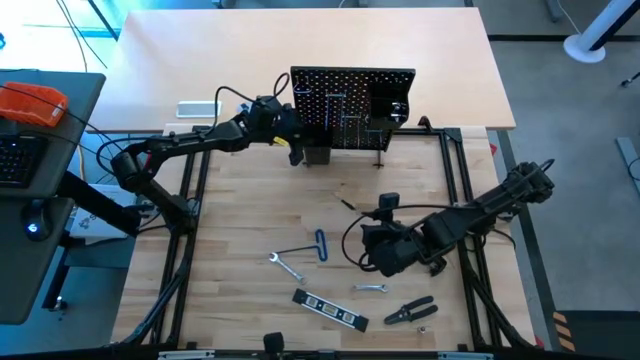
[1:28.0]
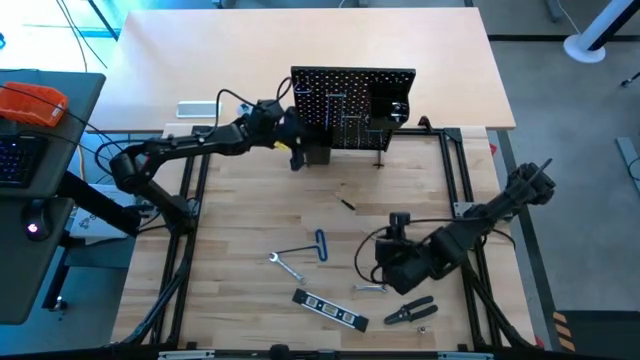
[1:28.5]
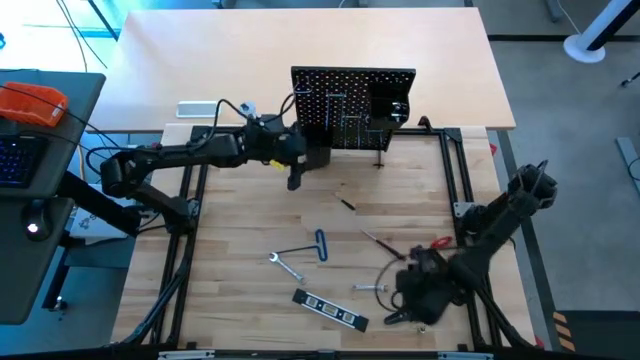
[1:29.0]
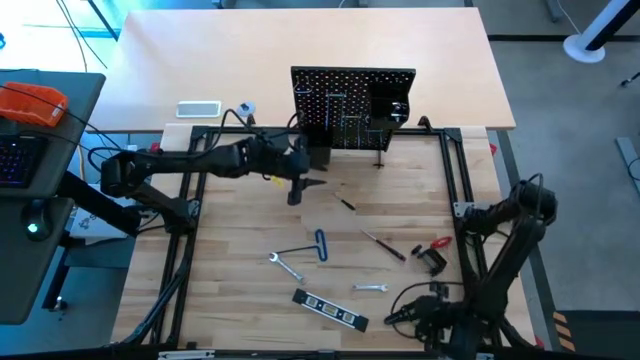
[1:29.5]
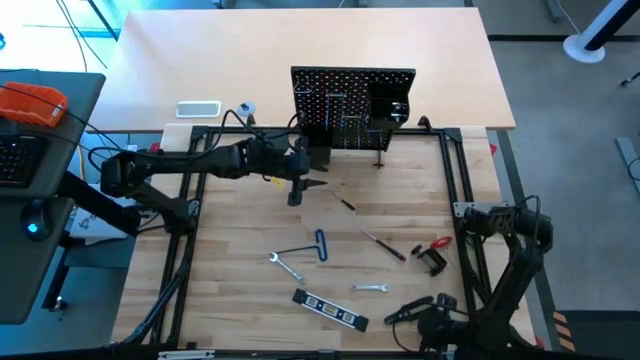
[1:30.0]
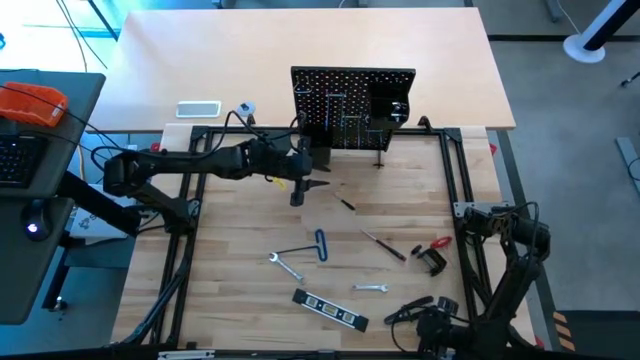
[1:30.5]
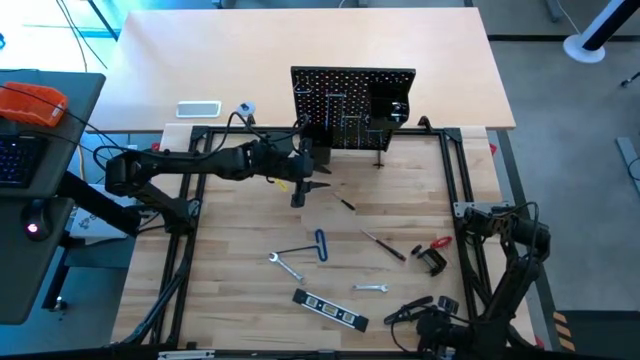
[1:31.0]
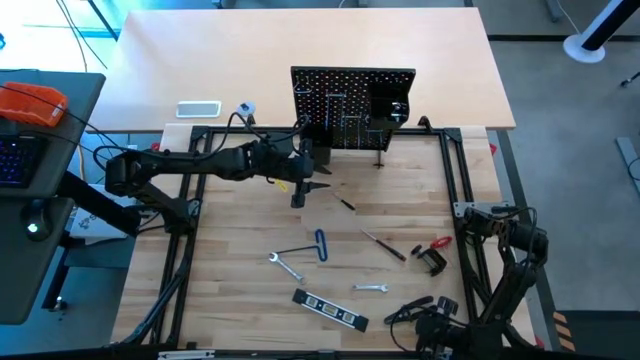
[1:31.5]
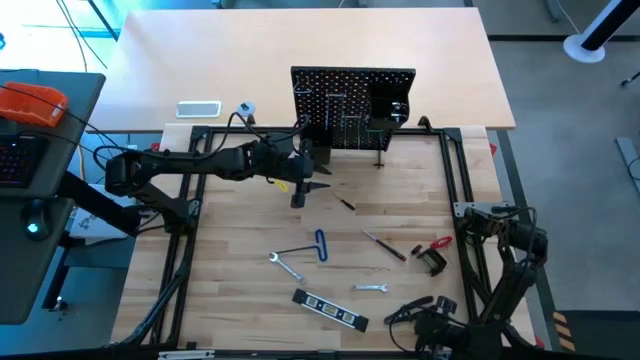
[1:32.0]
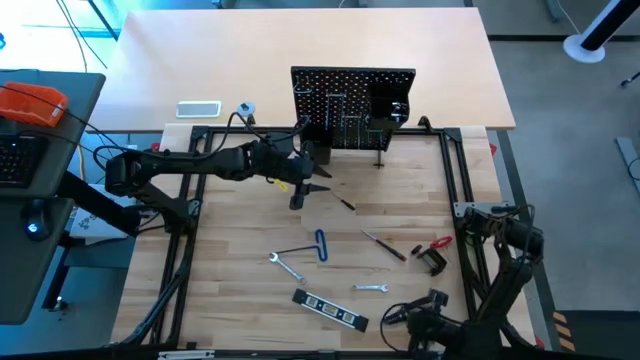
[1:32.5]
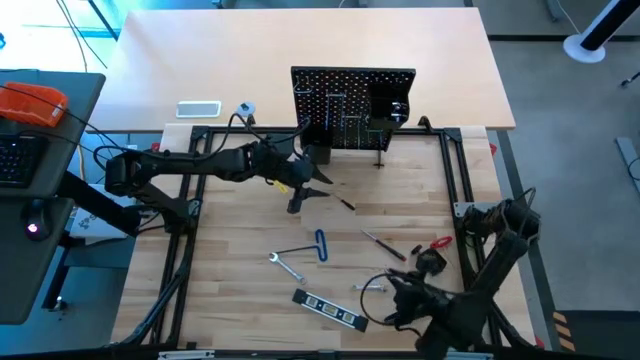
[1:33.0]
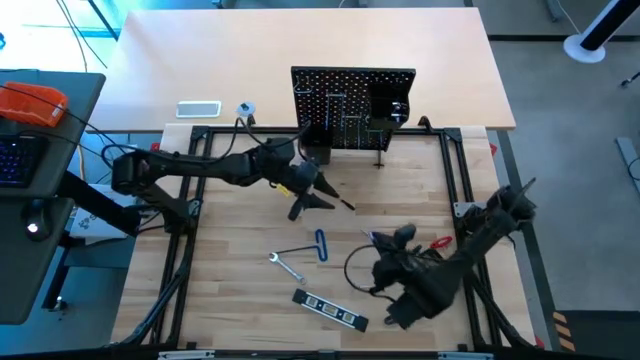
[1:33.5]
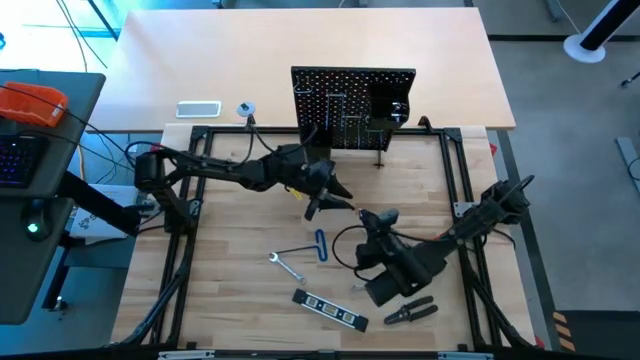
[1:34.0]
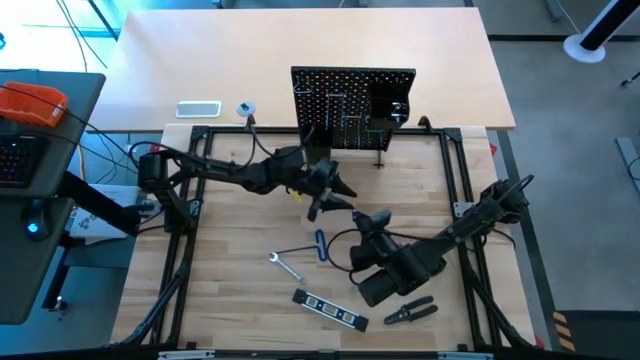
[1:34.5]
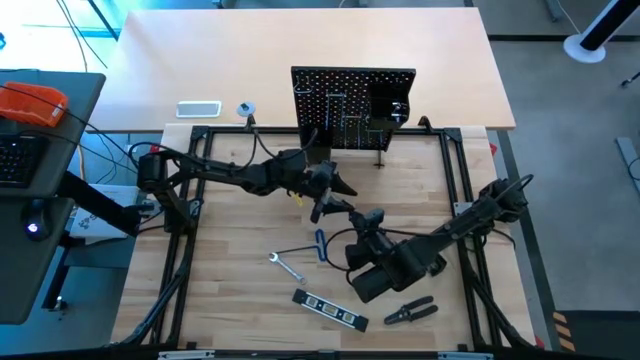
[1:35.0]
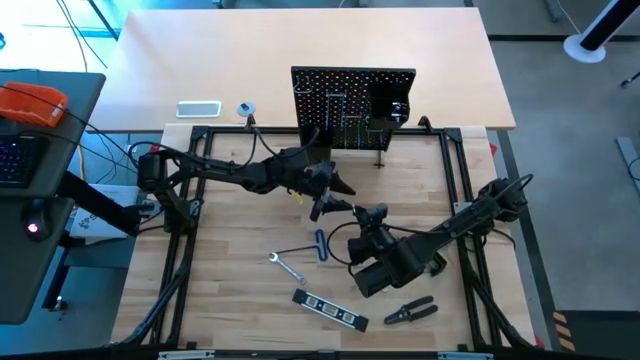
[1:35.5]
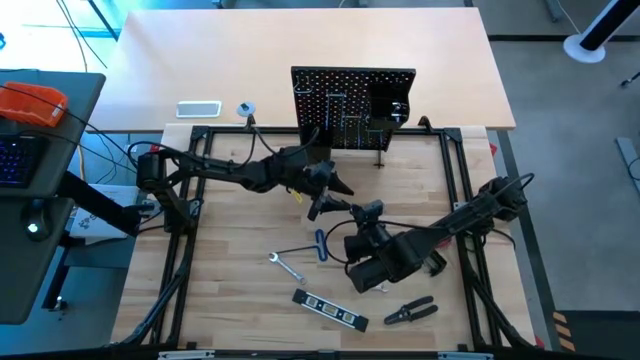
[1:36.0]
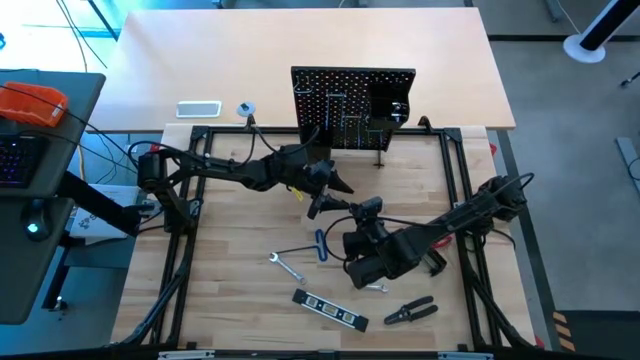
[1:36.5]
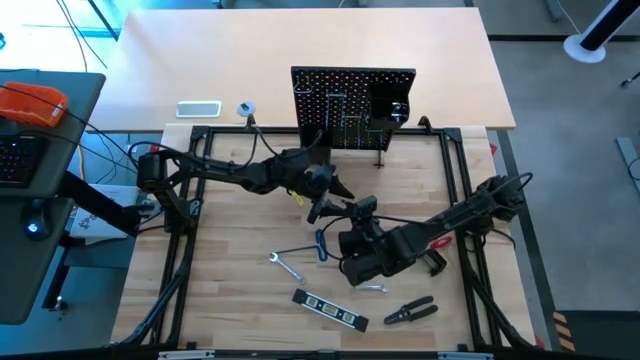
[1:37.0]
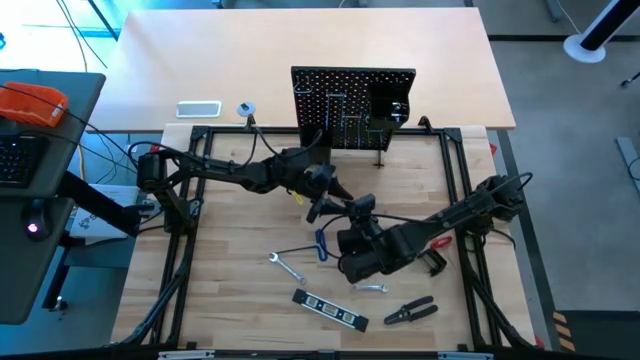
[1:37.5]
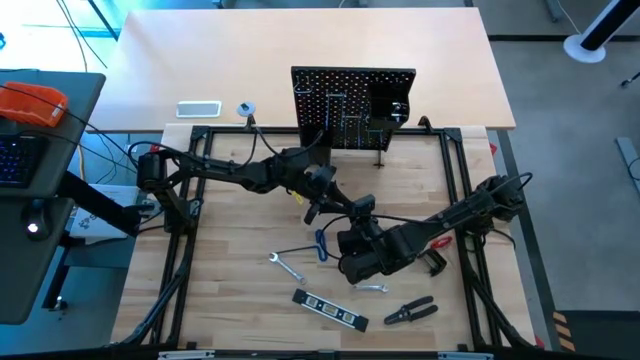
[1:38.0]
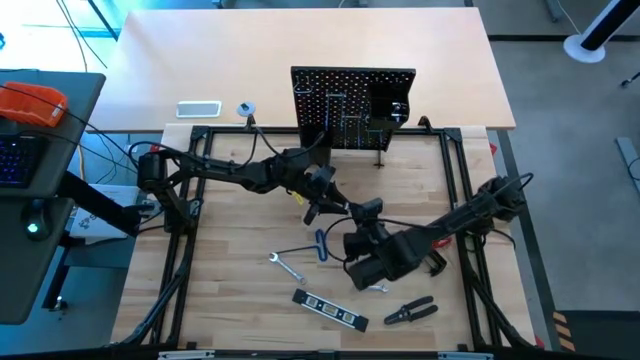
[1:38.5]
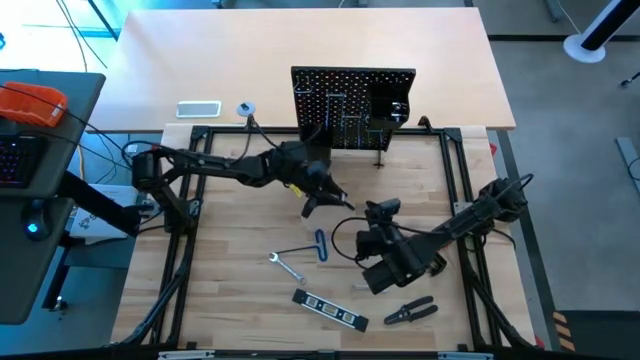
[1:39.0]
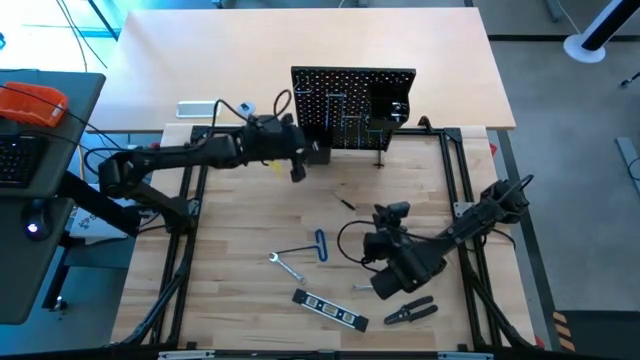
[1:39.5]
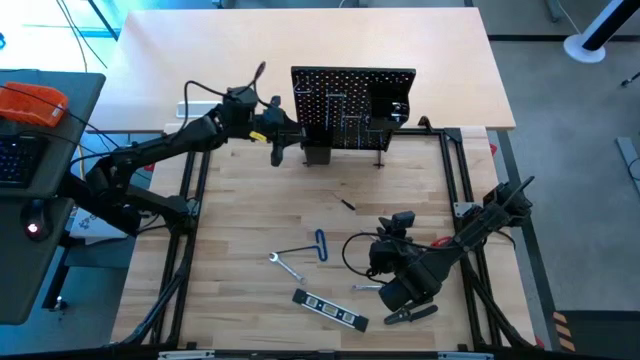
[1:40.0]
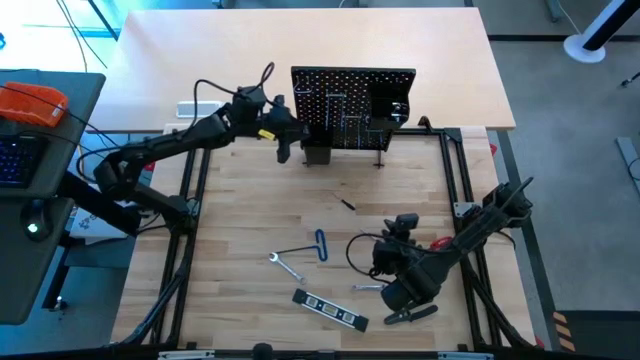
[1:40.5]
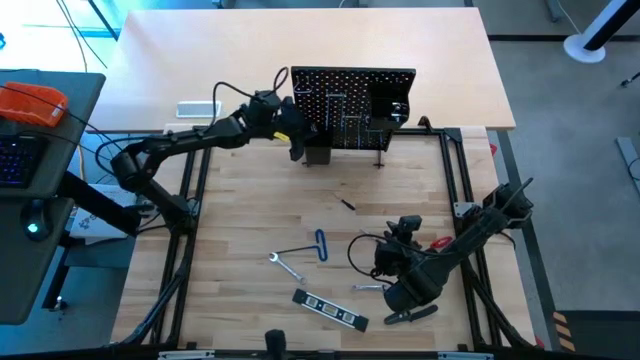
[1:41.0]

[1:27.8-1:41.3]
Task: Hang tools onto peg board
Put the bolts on the pegboard

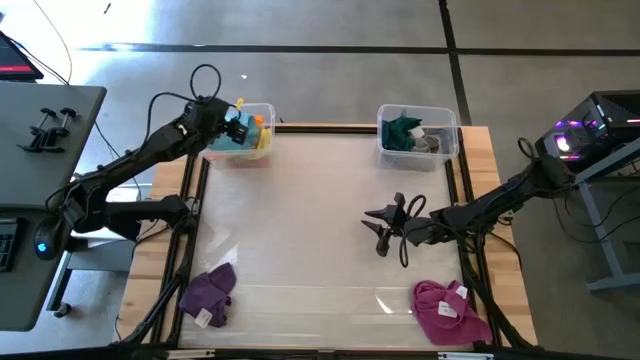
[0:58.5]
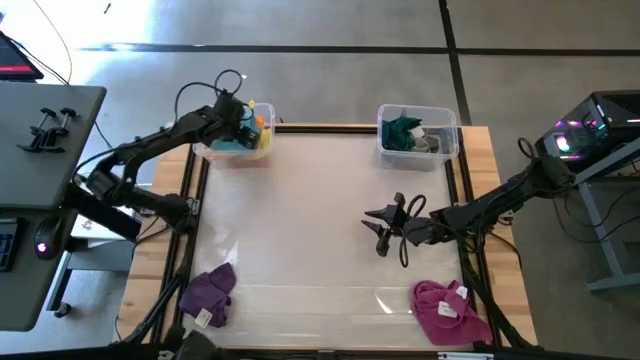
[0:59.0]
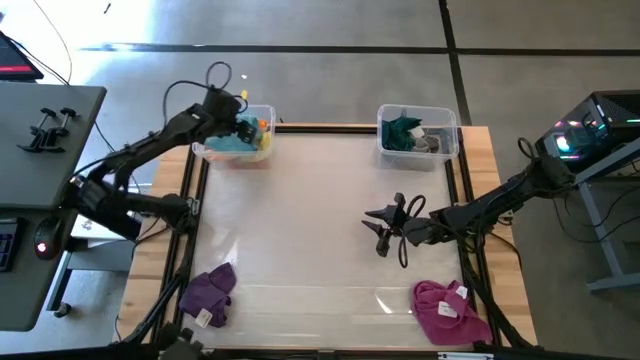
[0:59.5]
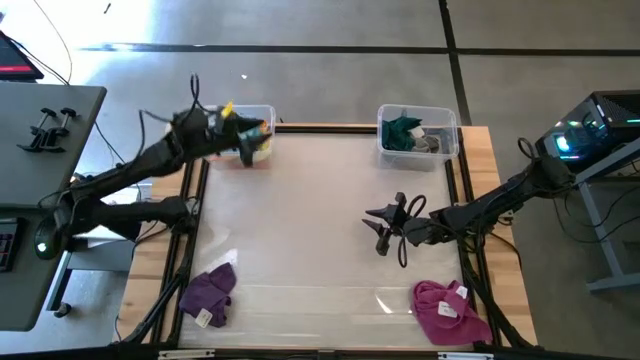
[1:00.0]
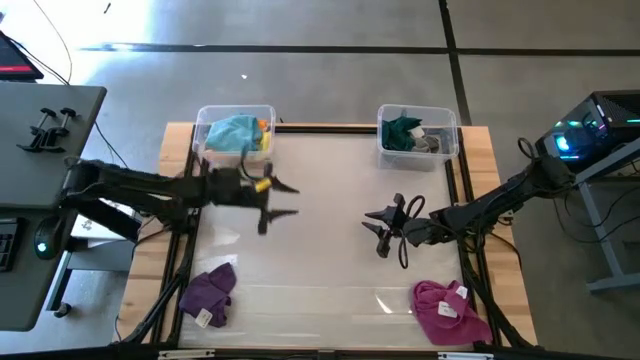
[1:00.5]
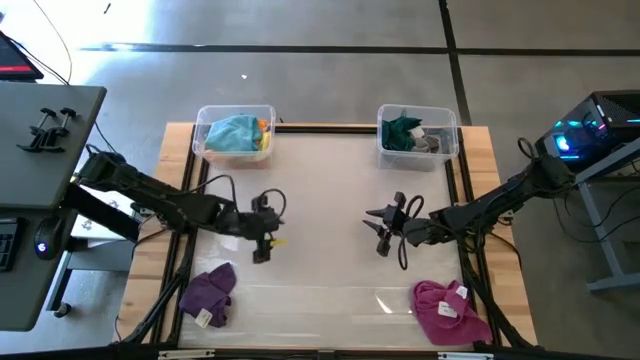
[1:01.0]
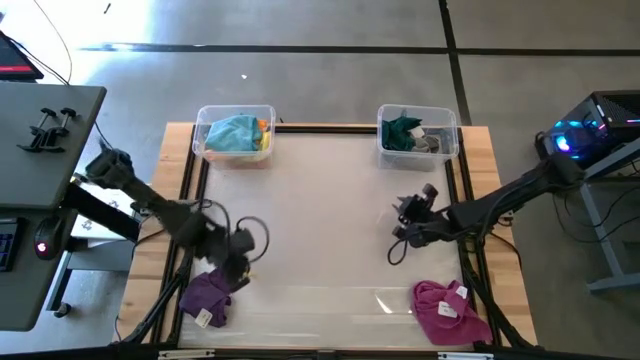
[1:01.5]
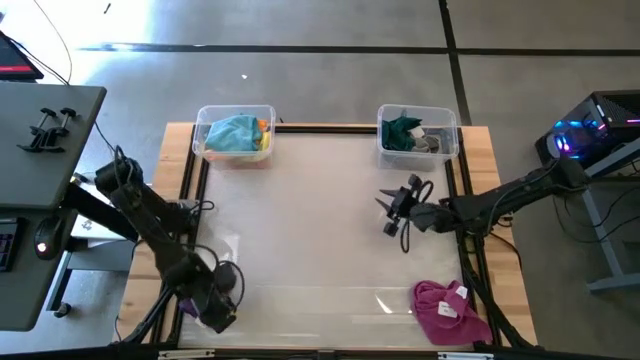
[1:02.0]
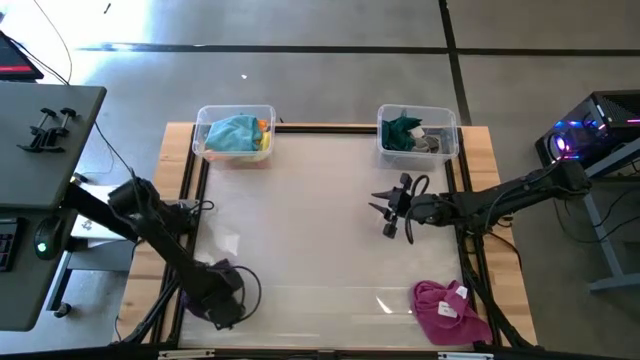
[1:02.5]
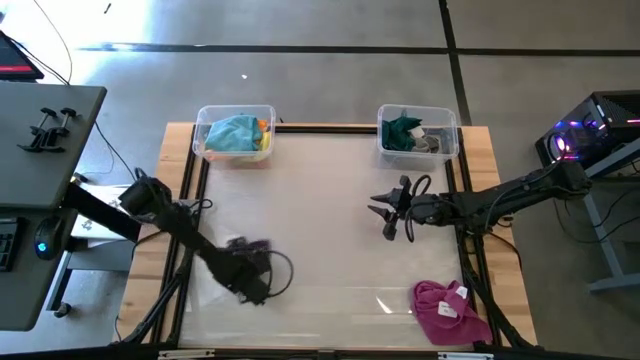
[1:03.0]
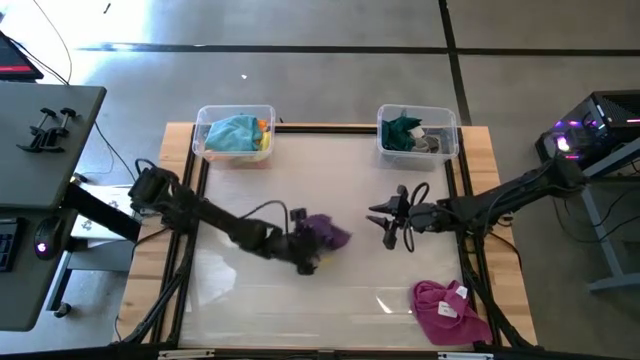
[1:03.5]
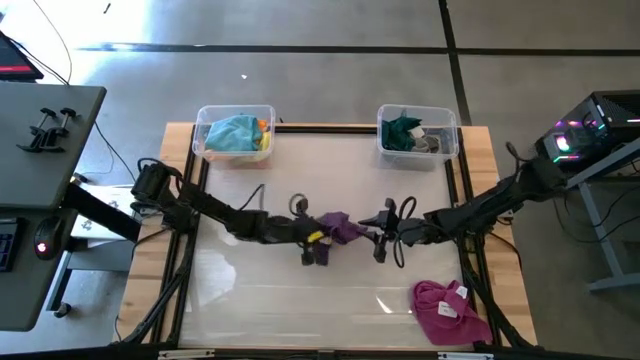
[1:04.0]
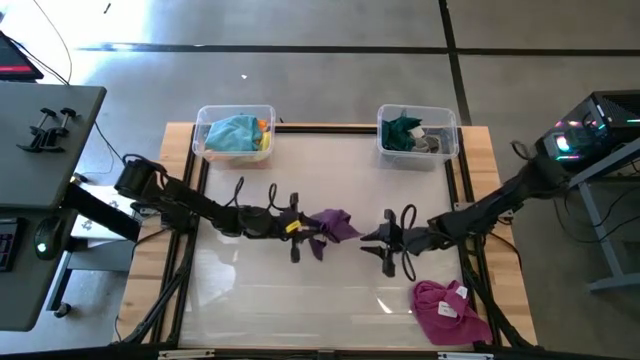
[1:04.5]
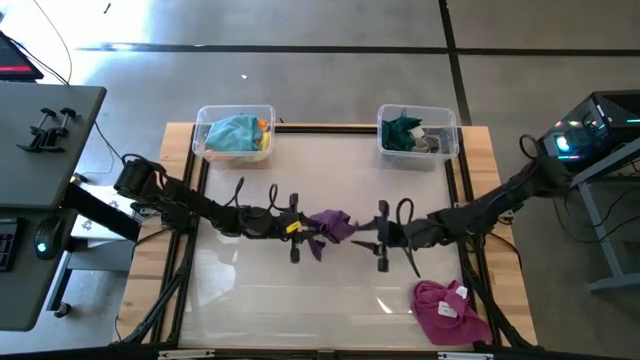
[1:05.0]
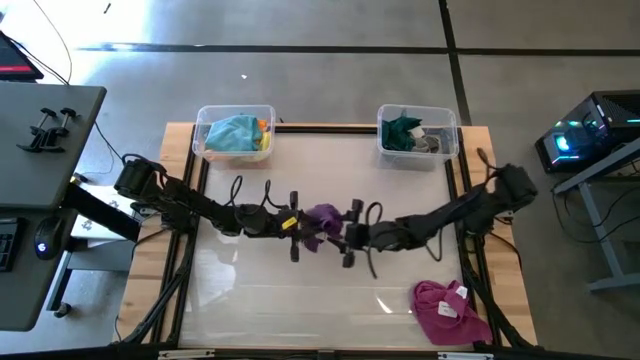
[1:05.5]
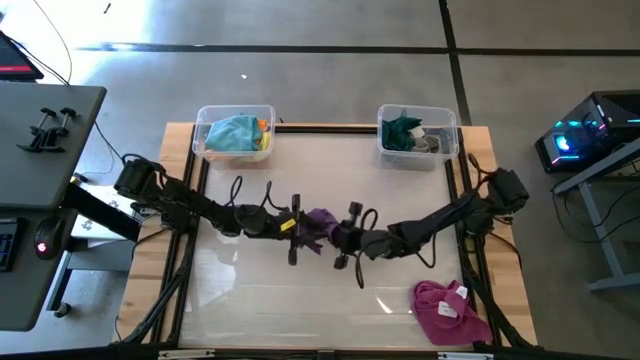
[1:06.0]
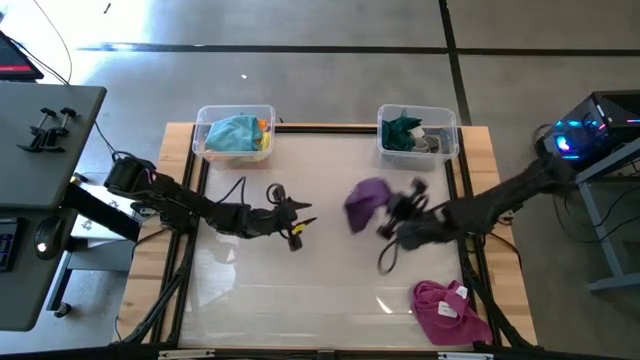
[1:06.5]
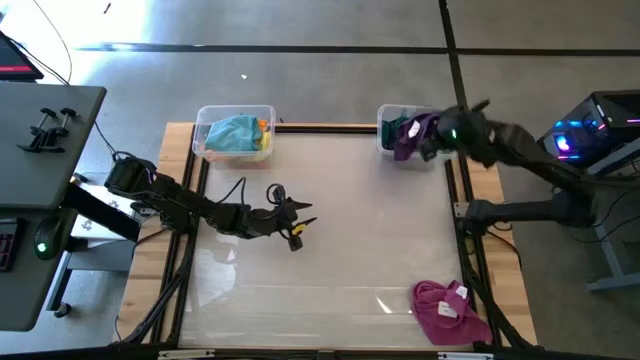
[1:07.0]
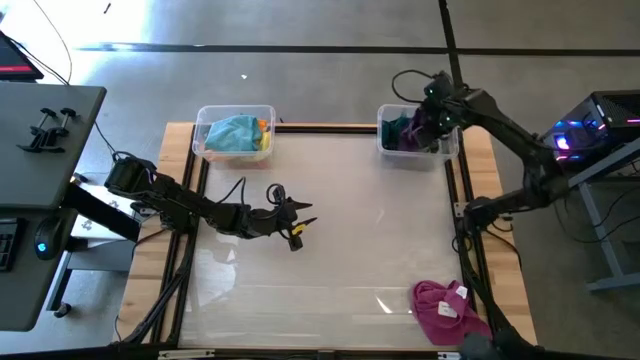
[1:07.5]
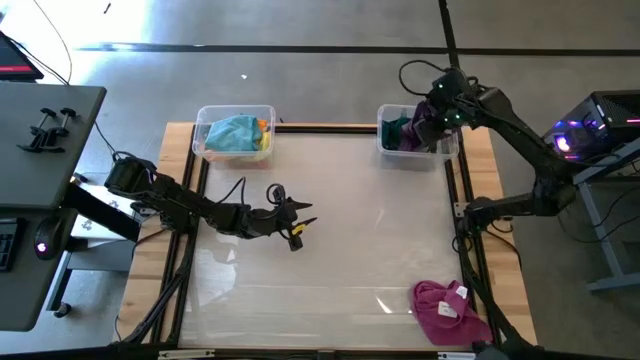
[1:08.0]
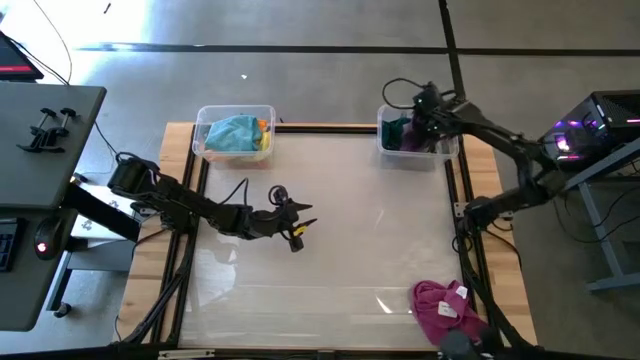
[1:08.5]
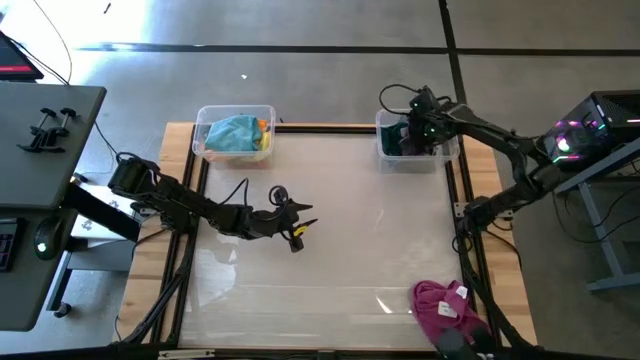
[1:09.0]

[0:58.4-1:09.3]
Task: Sort towels by color in basket
Put the violet microfiber cloth into the right transparent bin
